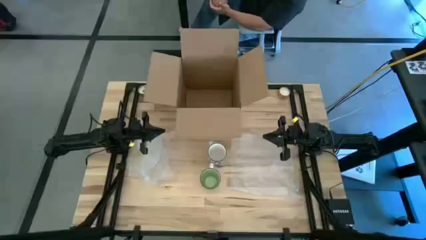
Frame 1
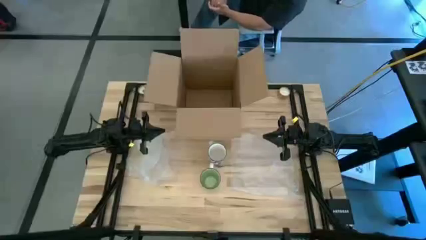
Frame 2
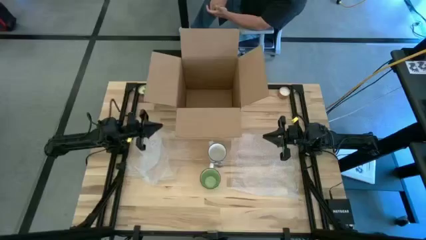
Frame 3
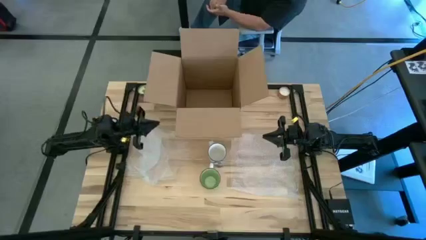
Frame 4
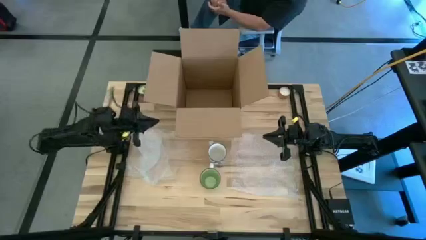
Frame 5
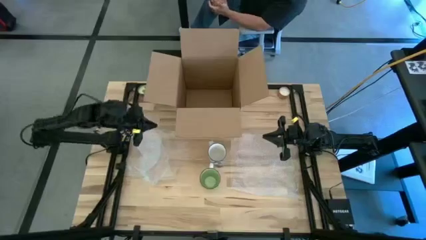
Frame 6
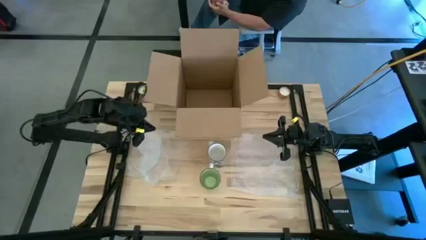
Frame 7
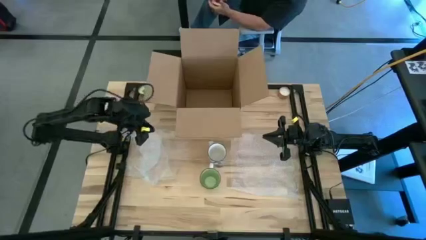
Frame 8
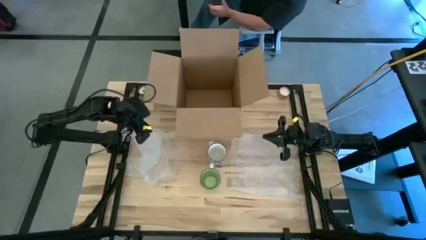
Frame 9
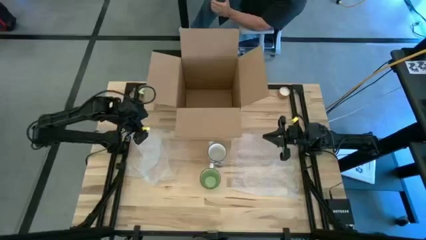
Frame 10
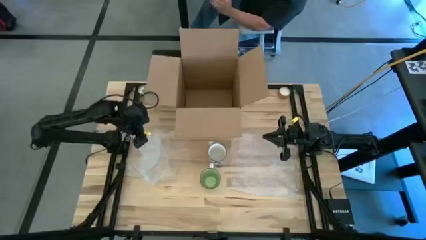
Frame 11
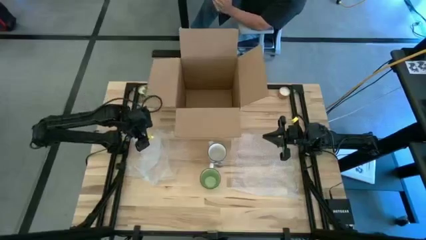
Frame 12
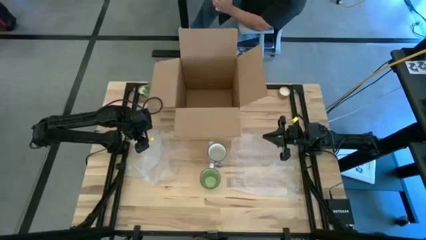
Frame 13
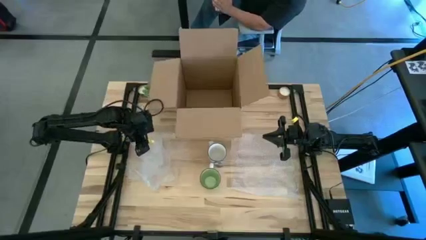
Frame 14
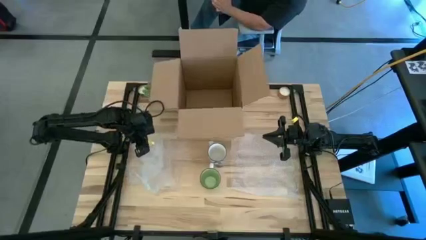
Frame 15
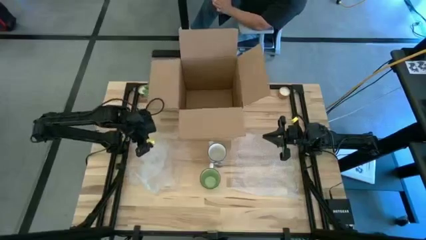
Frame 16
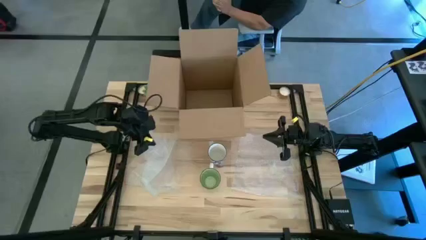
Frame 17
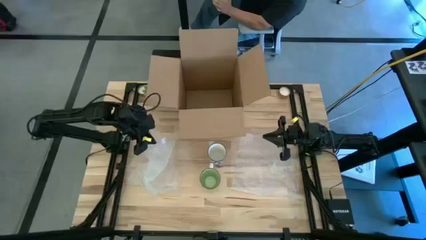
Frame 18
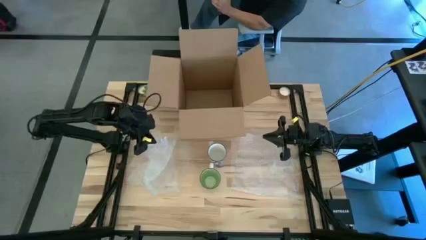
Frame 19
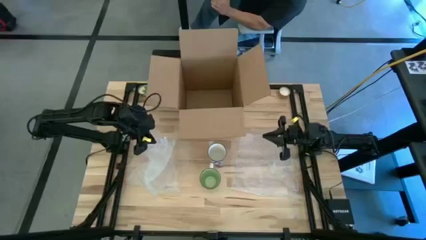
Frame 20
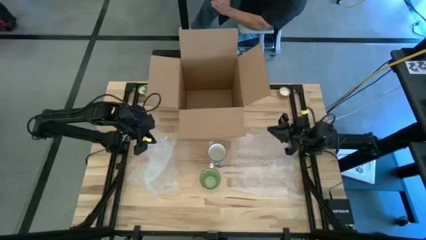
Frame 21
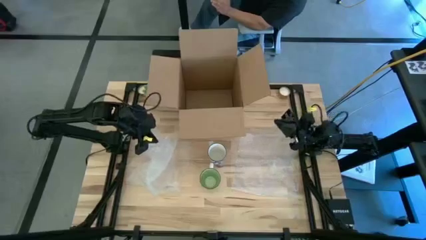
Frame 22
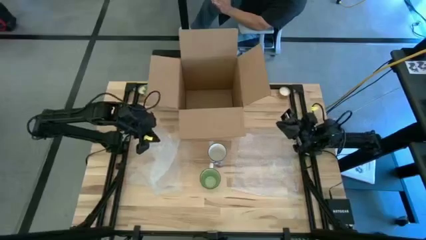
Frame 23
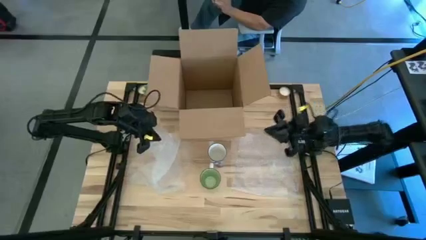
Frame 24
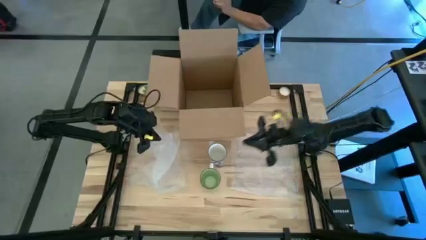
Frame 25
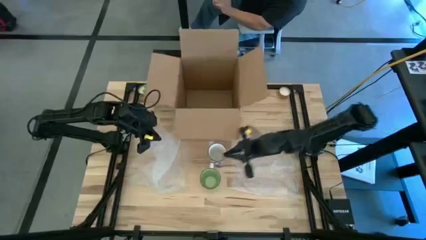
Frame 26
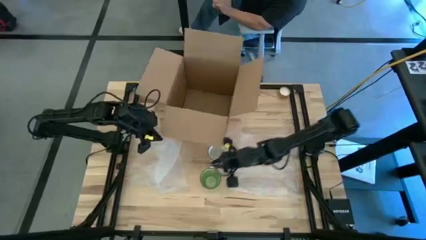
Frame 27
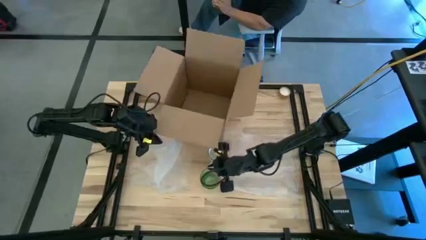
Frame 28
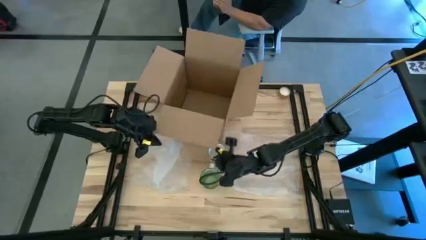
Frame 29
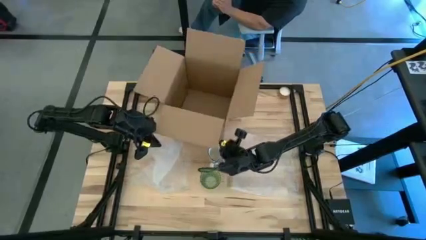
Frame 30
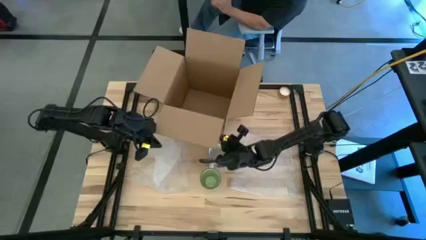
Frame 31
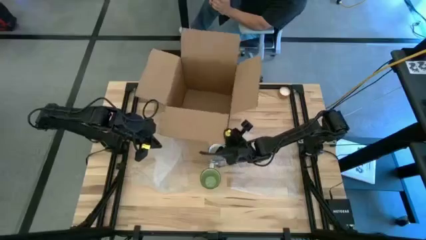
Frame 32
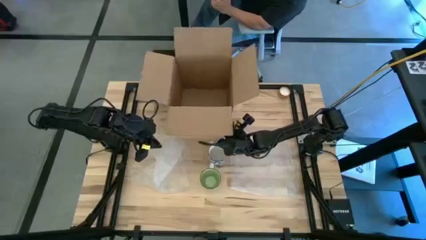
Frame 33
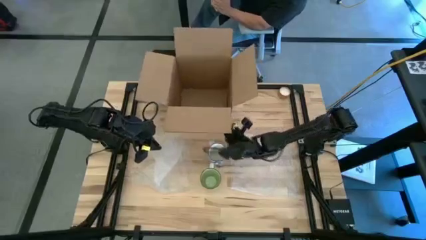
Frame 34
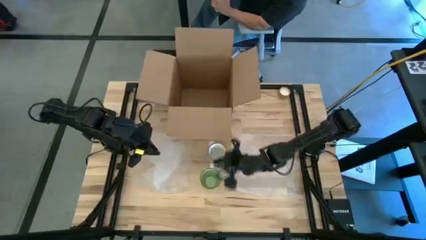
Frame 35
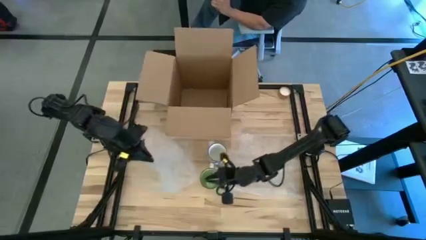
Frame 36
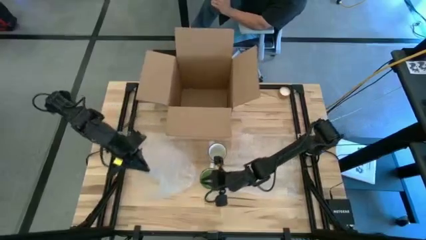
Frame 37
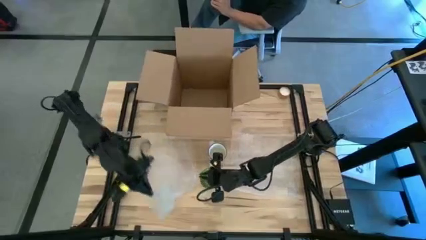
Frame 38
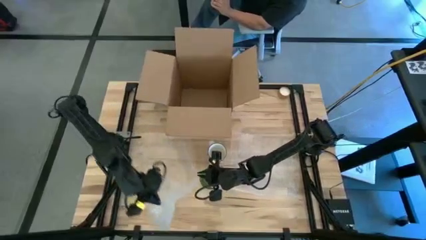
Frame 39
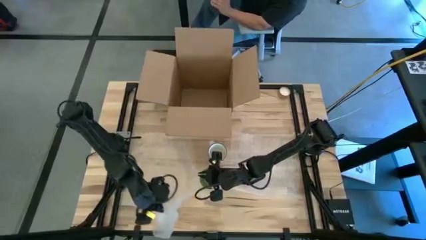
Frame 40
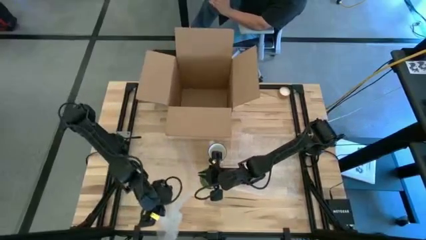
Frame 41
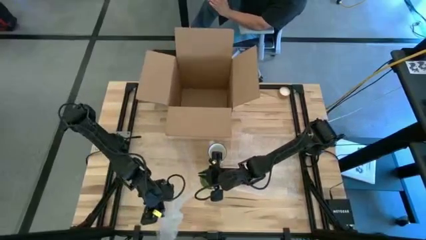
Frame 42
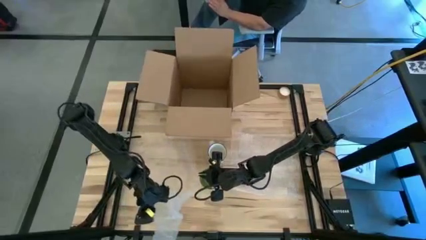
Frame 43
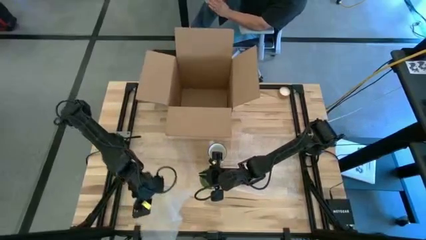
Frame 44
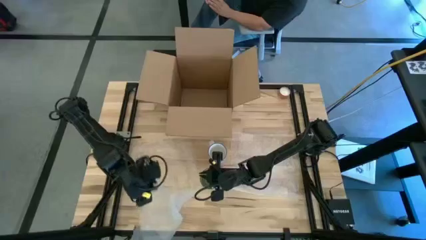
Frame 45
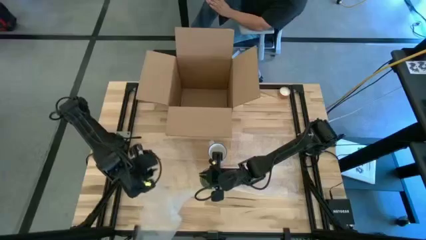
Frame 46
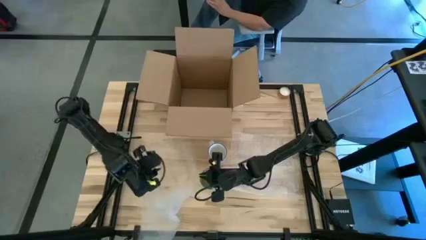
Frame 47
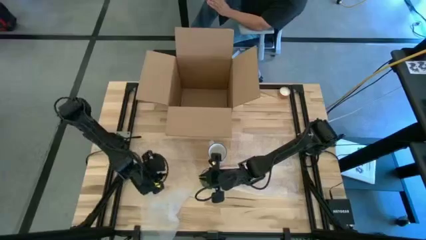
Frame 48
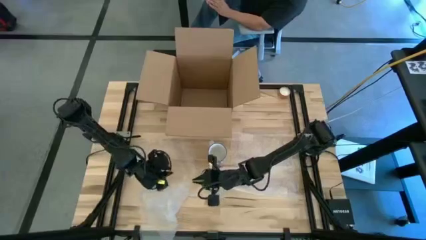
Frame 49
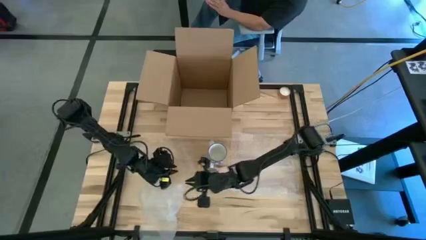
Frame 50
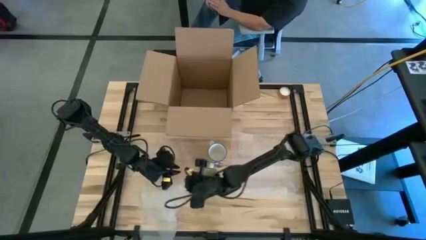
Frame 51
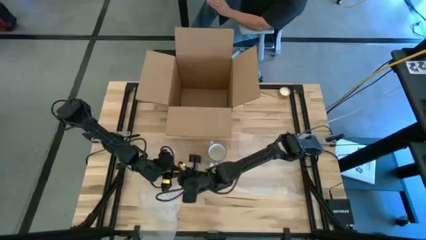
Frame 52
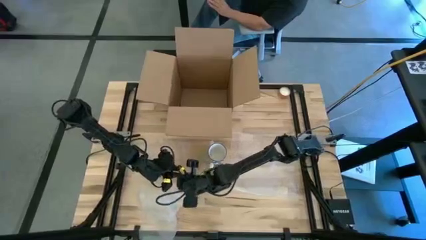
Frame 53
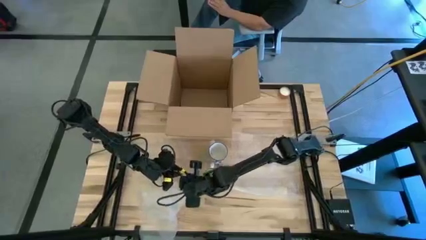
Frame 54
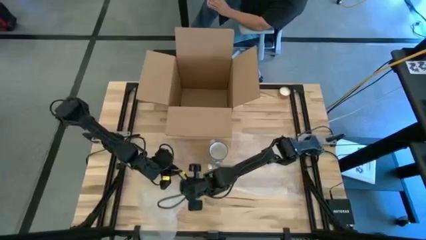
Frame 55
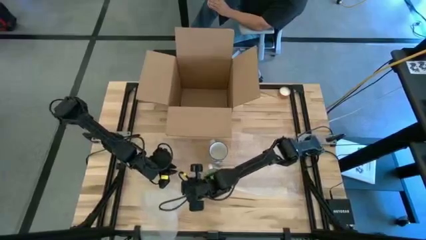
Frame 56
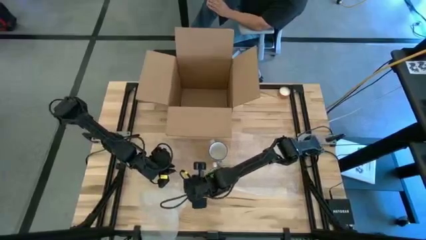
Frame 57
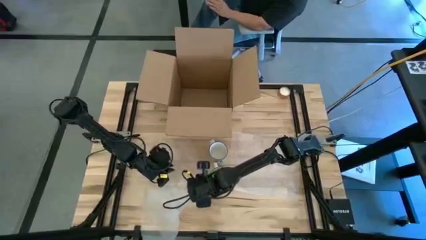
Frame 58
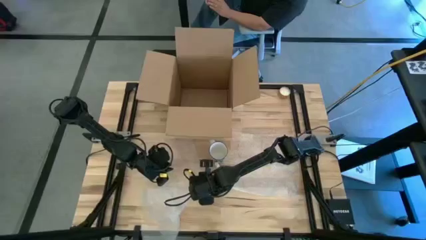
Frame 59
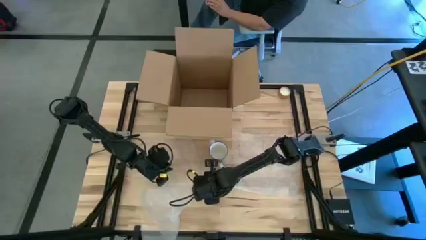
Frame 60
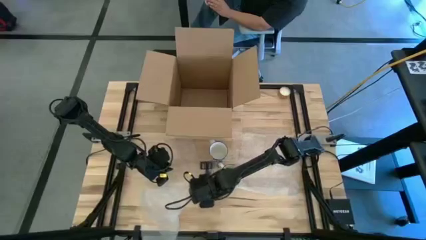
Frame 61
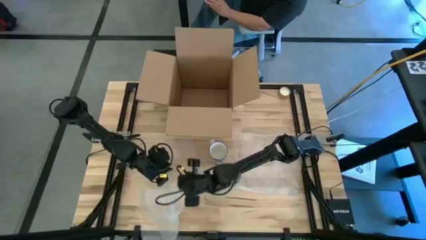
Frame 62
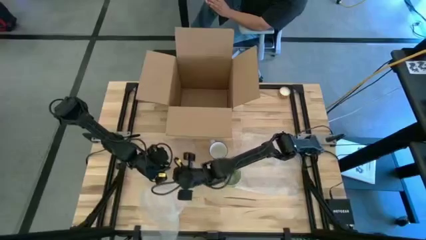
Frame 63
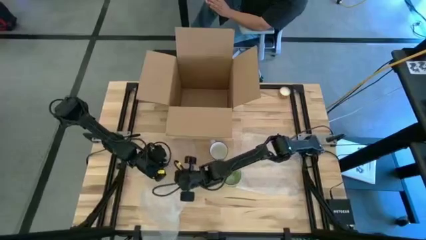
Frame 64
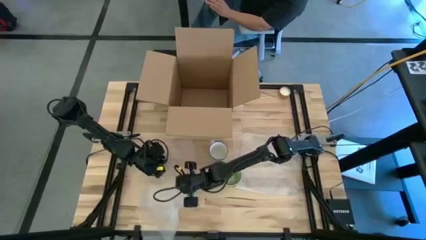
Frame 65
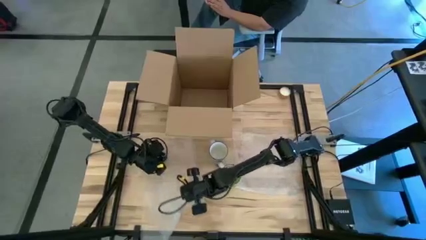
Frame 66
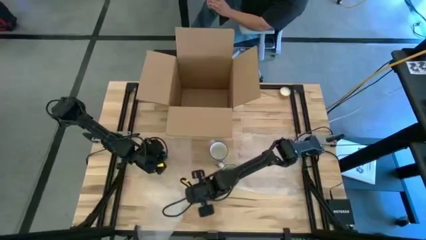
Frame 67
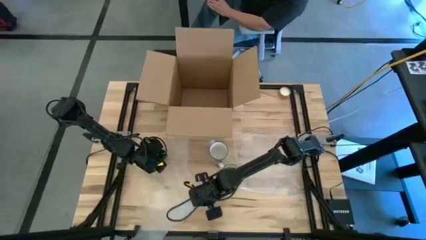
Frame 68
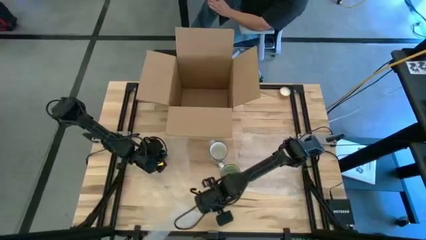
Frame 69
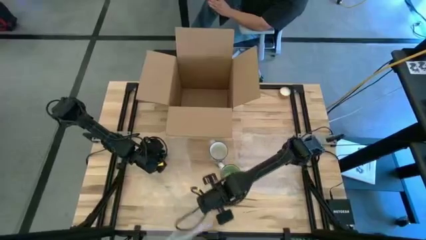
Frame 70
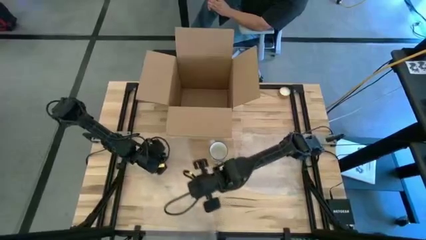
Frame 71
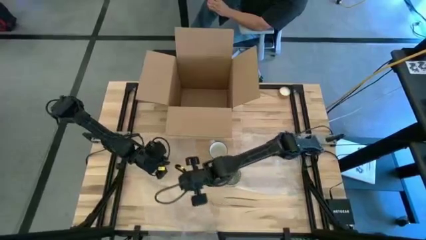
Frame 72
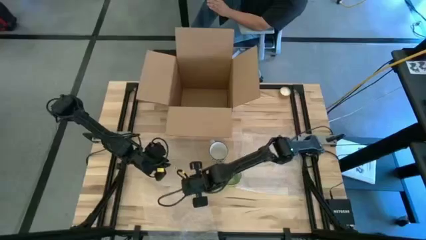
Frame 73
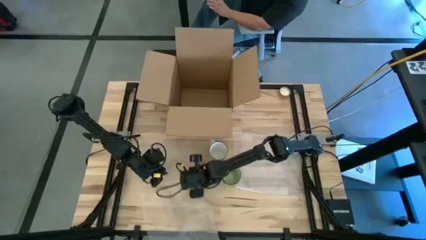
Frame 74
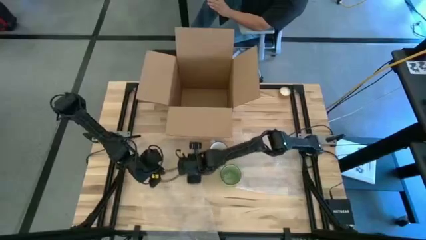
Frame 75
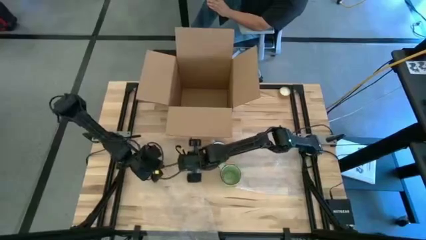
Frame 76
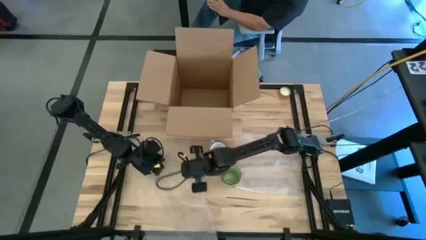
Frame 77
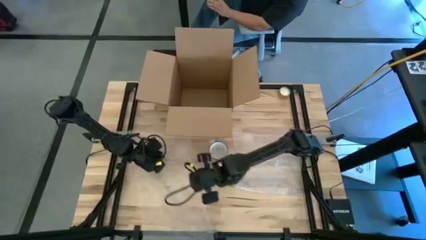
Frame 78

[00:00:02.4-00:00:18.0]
Task: wrap mug
Prepare the left transparent bubble wrap
